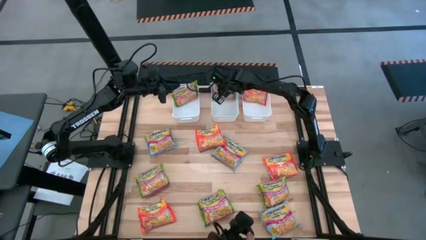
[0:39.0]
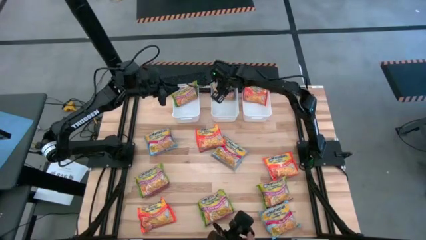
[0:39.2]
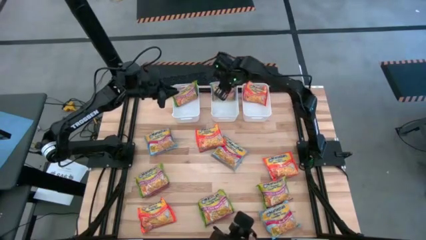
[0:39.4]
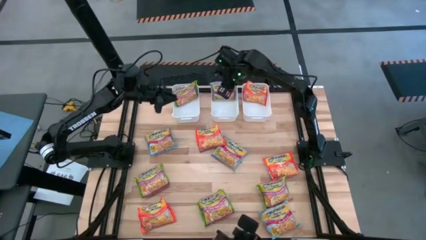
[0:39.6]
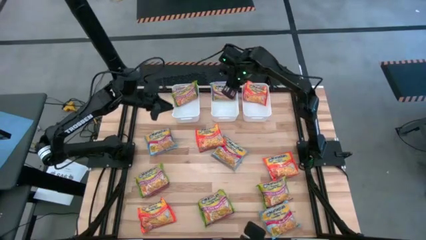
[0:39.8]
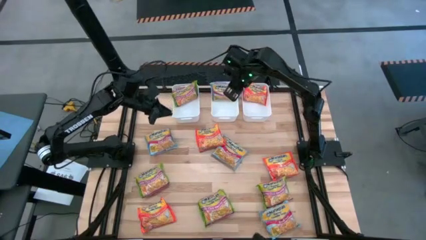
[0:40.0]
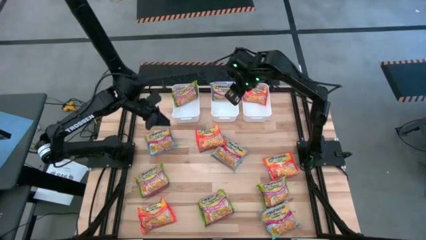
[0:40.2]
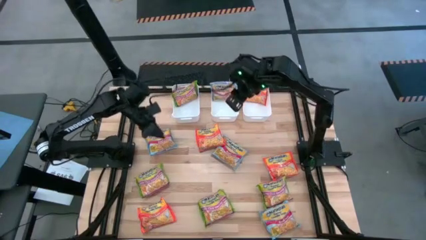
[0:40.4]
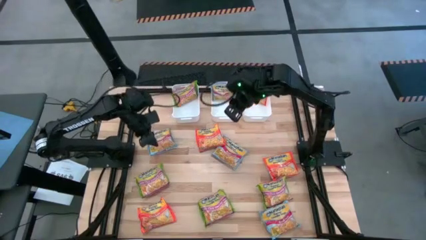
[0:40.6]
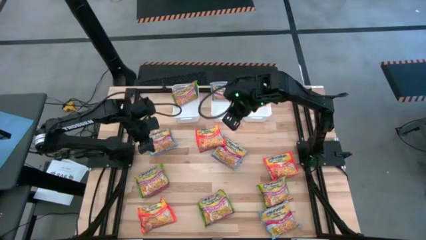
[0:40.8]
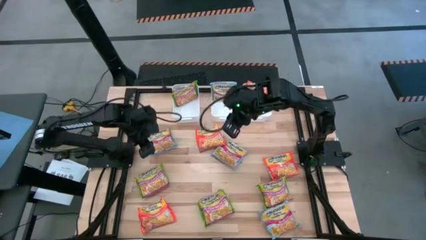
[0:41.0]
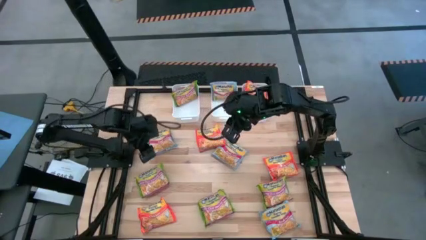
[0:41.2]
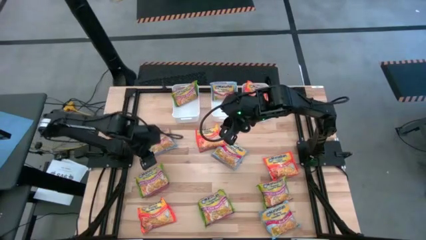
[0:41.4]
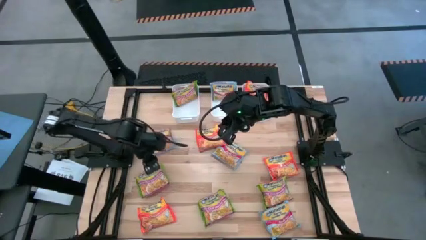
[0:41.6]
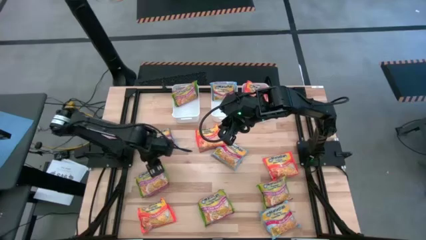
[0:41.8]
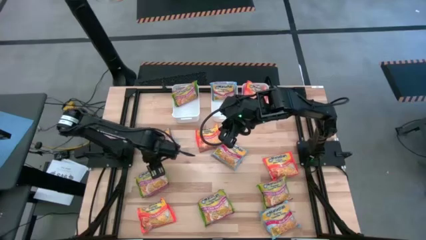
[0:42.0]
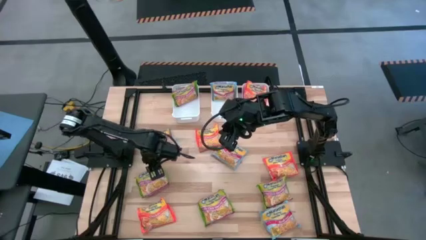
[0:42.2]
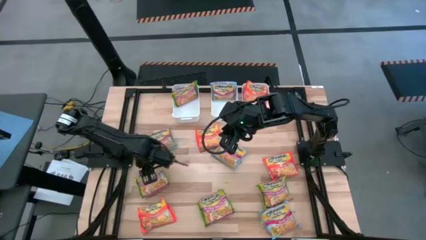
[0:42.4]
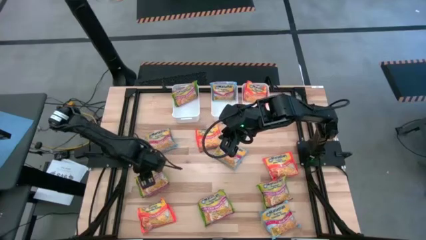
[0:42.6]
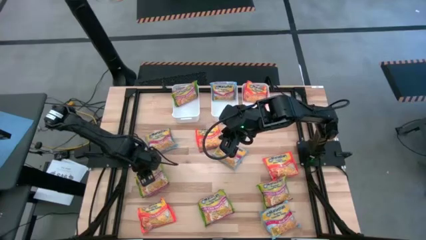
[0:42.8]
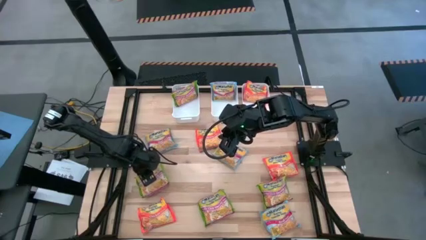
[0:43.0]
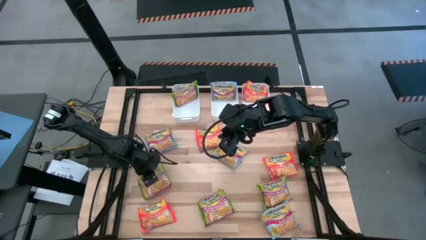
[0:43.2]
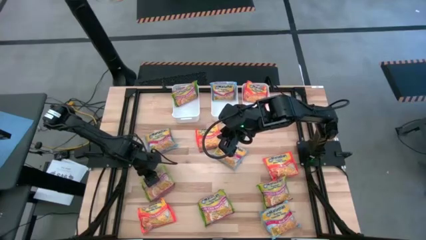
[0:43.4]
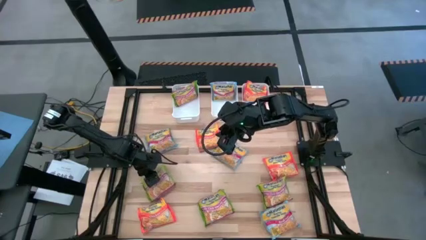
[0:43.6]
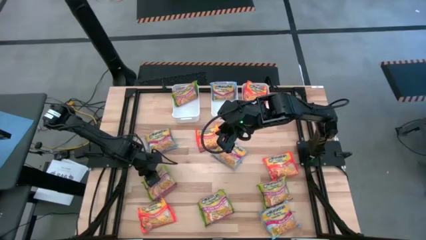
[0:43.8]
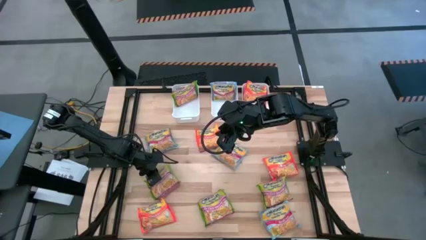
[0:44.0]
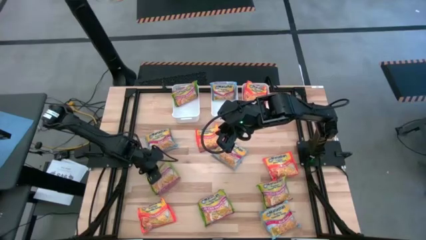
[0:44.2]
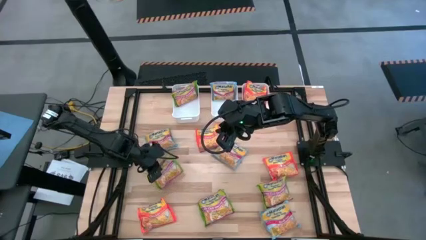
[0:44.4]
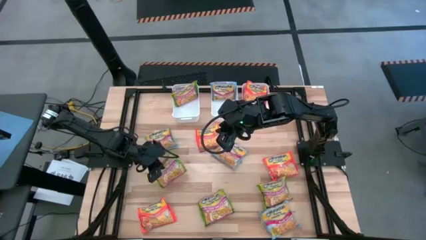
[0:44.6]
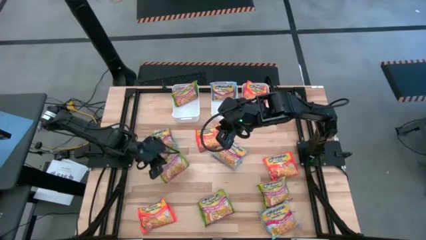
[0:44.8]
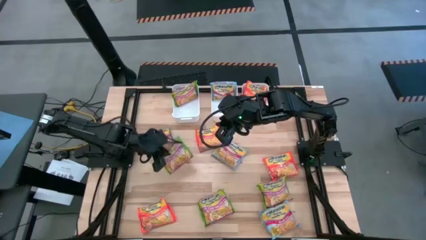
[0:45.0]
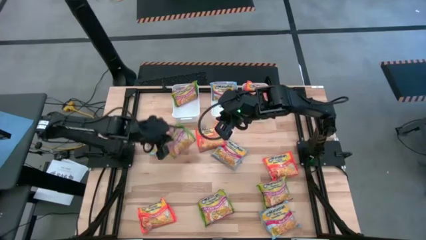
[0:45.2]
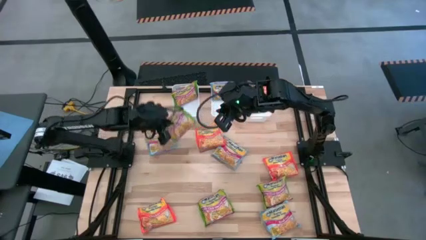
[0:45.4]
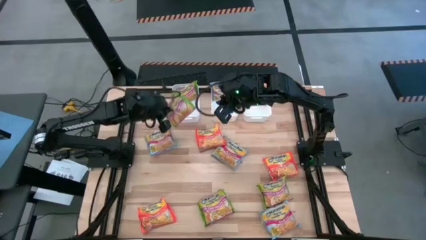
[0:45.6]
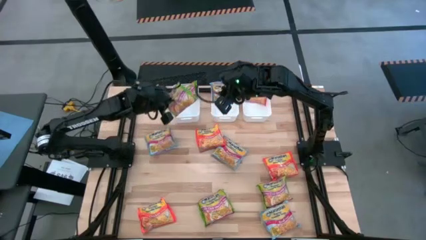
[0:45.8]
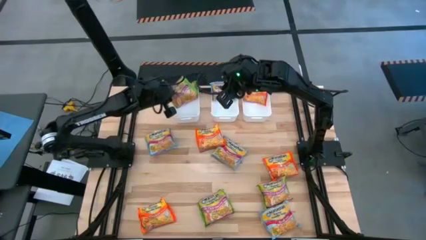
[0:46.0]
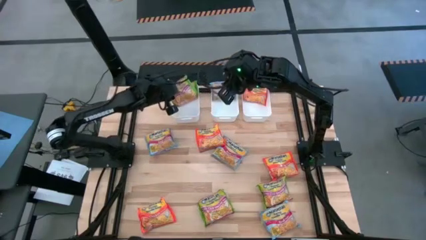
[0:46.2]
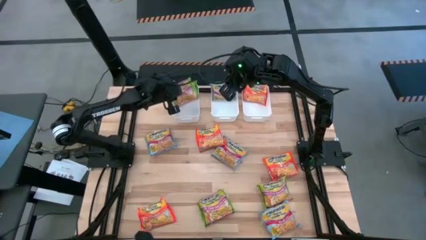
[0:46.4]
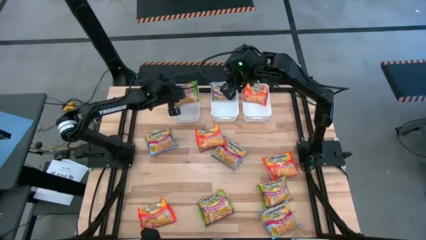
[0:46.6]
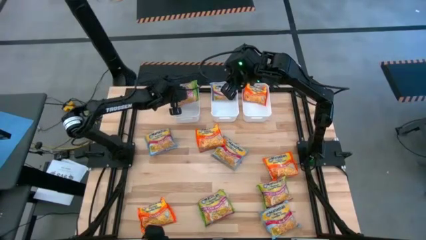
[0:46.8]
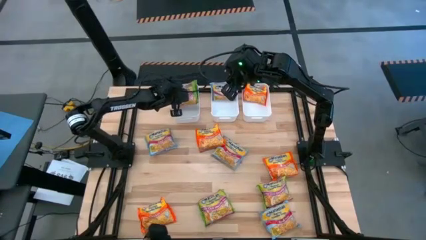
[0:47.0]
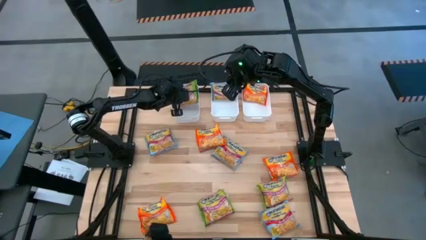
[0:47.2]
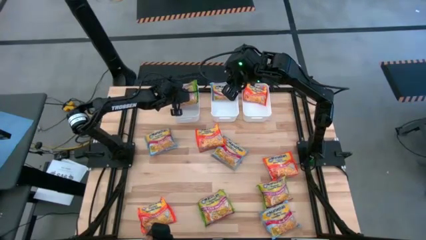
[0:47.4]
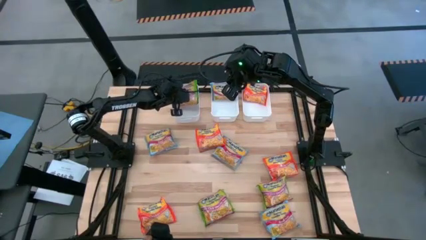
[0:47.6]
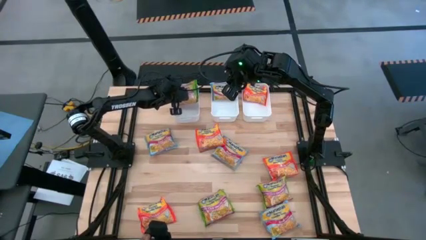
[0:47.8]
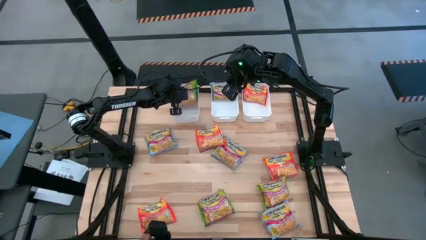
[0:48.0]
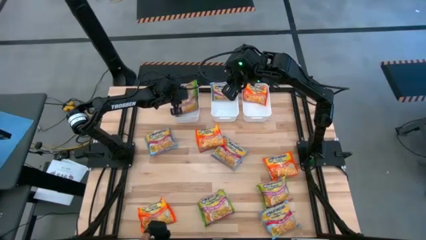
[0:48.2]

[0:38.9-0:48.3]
Task: Sort Maruchan noodles
Put the green noodle pack into the left white bin

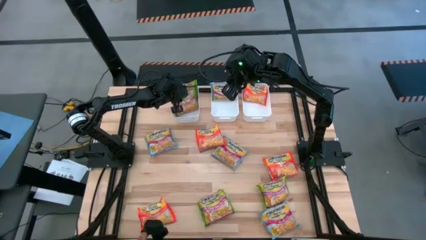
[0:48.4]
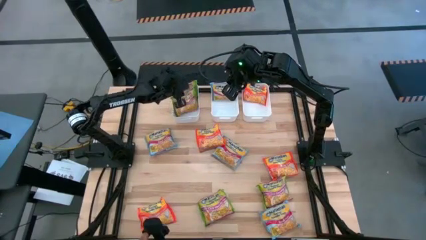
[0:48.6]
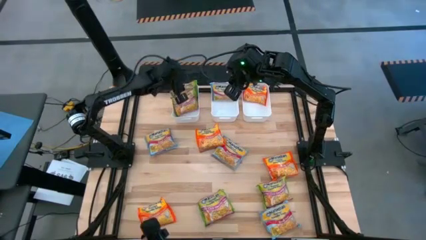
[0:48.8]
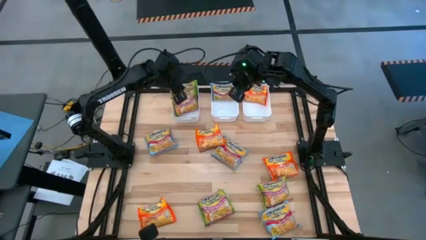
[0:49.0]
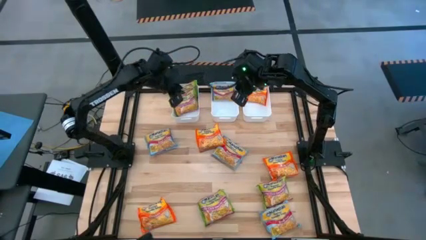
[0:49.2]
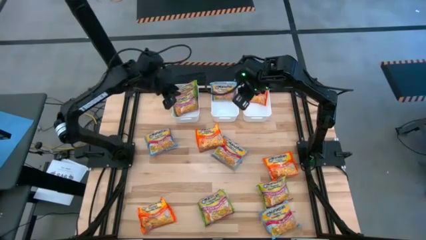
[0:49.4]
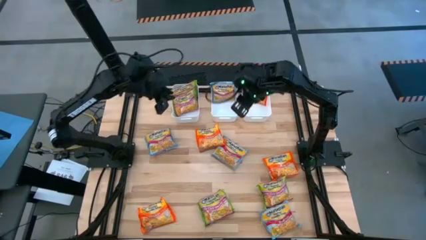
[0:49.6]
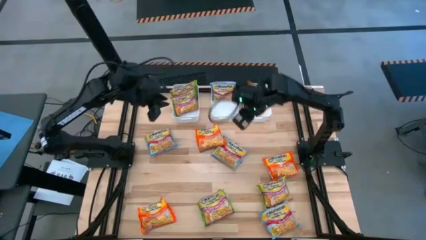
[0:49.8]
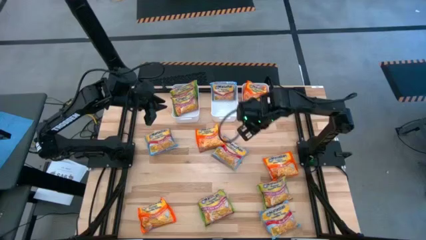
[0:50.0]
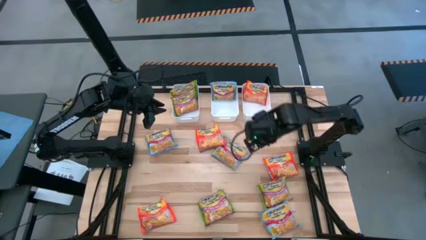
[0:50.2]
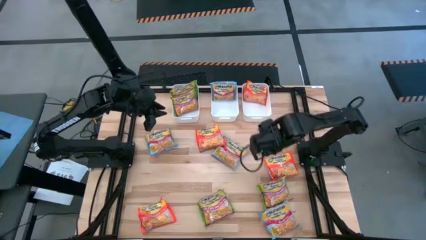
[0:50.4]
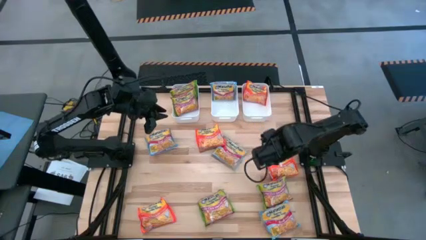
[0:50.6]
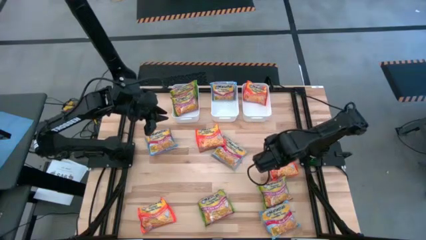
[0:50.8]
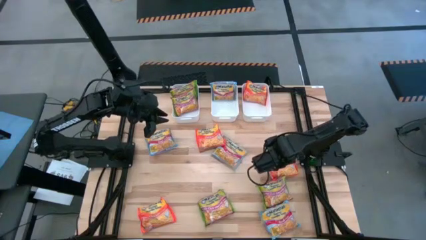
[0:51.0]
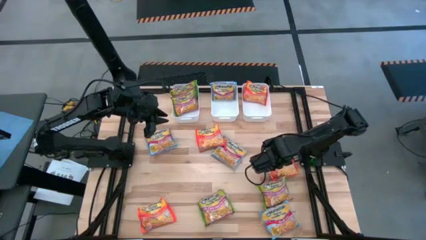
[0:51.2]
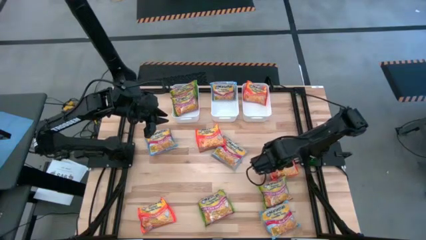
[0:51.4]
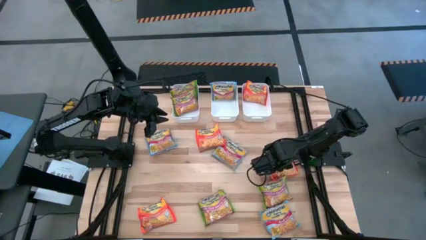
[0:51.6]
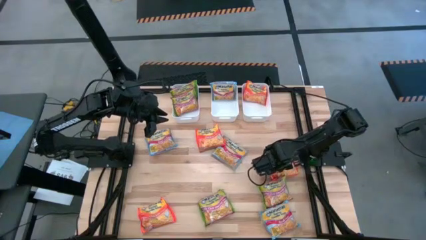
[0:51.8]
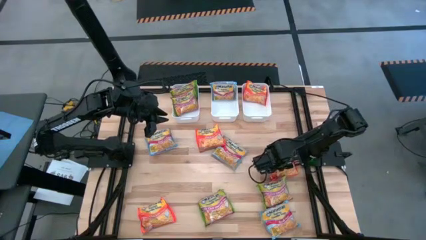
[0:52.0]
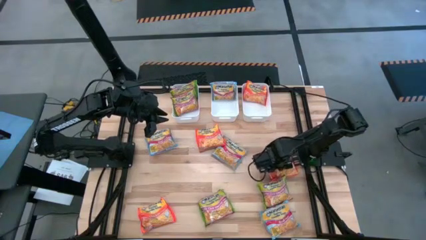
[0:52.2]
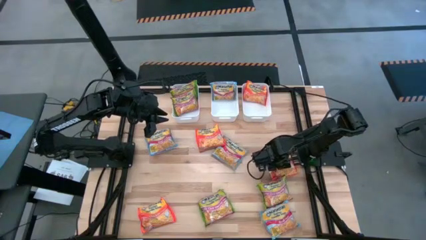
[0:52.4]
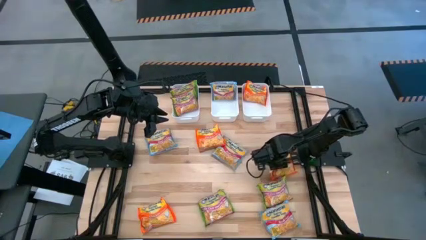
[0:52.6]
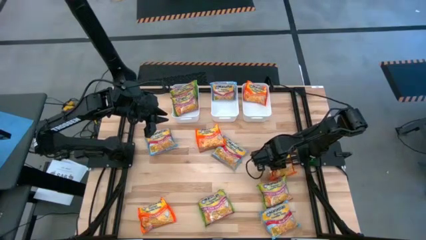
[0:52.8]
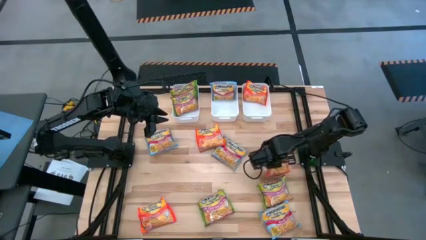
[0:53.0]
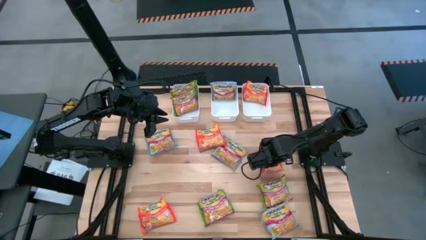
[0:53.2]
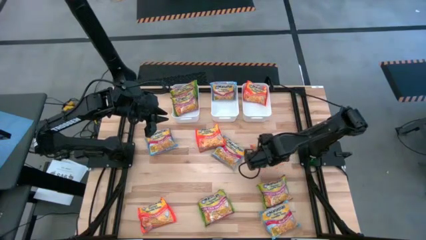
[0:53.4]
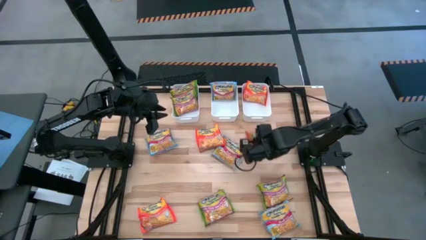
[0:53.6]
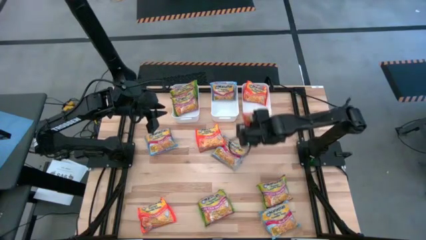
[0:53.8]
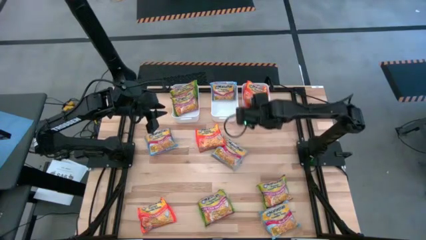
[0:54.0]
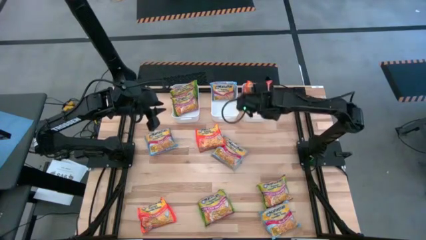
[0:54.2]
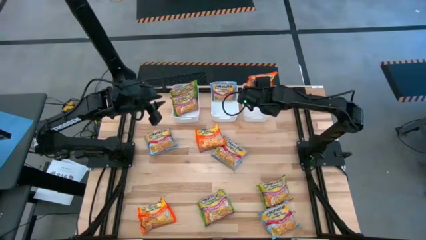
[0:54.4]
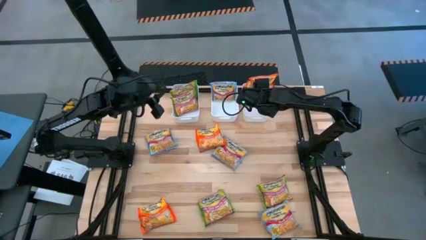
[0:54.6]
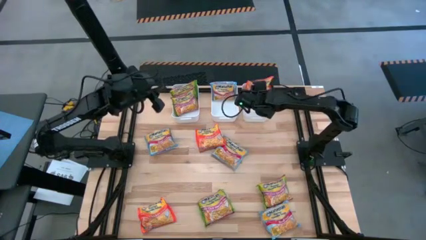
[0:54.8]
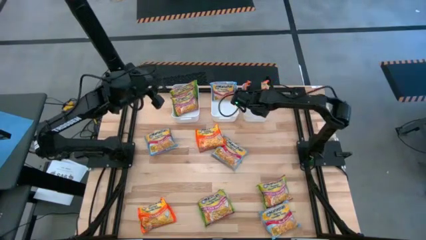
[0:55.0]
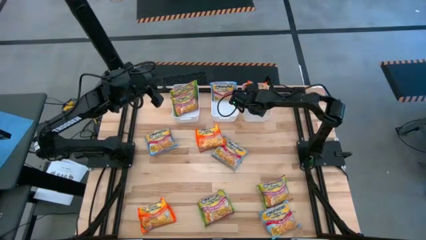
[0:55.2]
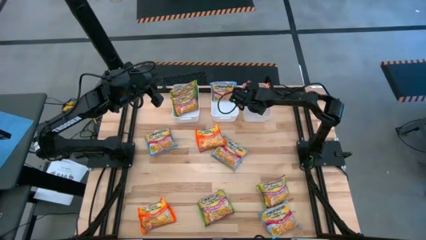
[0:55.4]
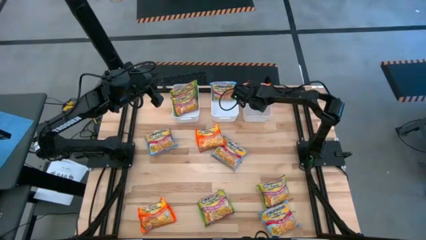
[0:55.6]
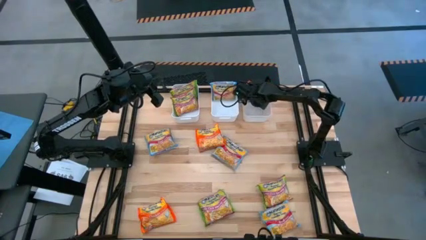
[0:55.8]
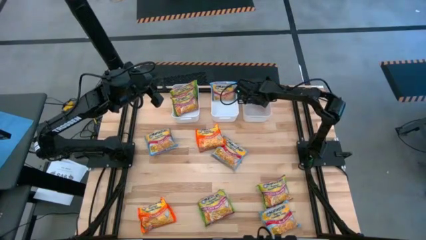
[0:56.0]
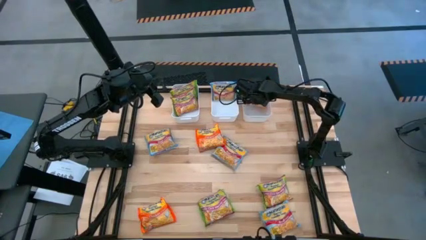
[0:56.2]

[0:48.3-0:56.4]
Put the orange noodle pack into the right white bin
